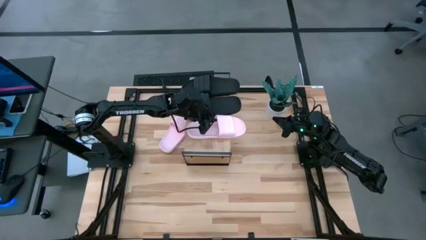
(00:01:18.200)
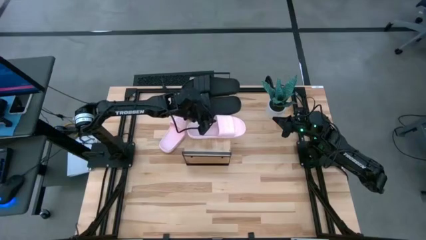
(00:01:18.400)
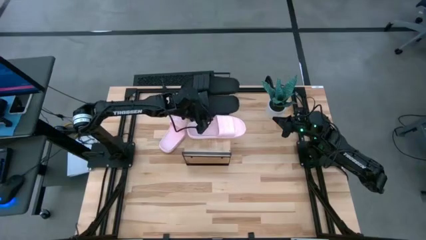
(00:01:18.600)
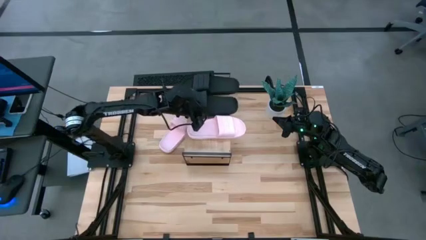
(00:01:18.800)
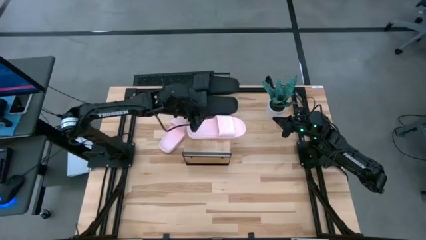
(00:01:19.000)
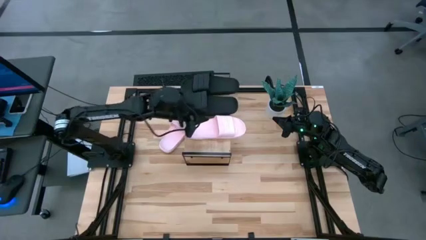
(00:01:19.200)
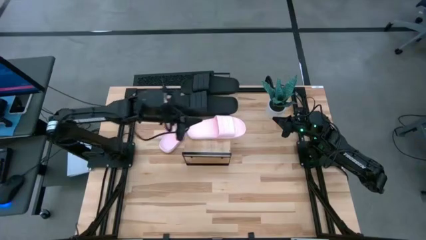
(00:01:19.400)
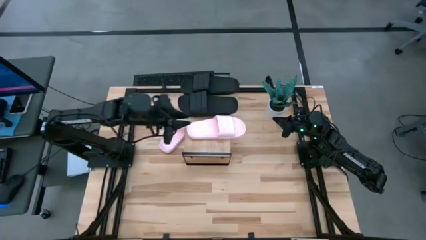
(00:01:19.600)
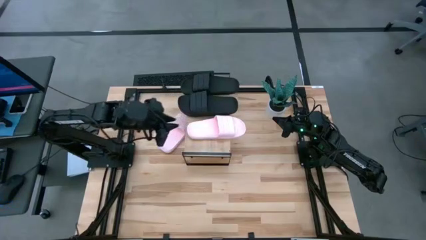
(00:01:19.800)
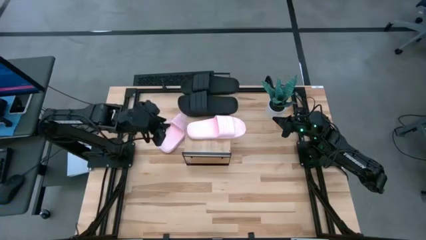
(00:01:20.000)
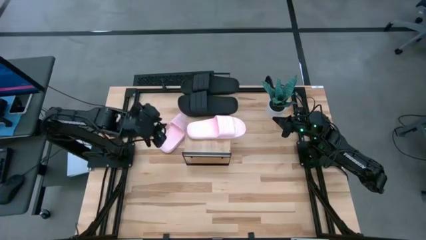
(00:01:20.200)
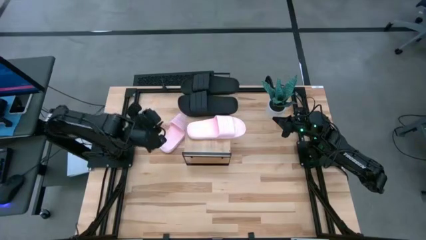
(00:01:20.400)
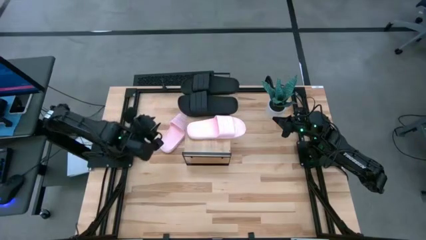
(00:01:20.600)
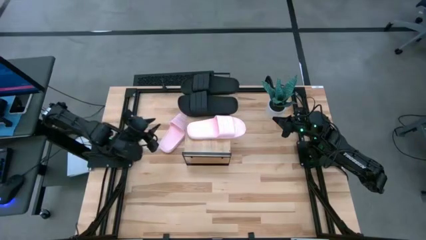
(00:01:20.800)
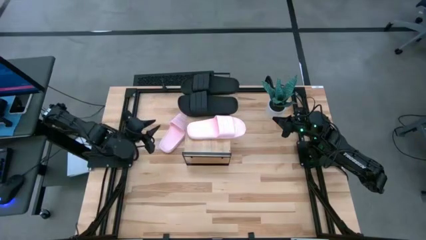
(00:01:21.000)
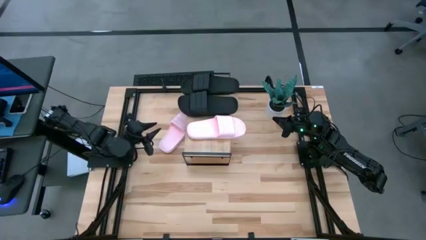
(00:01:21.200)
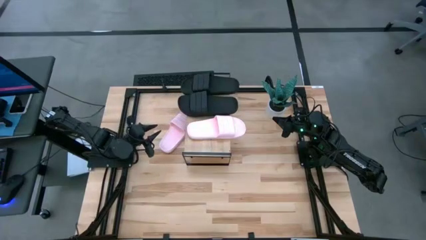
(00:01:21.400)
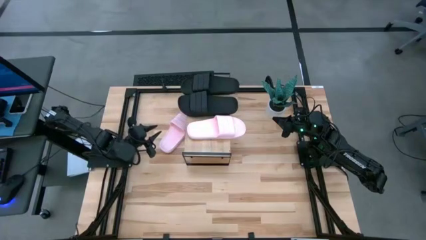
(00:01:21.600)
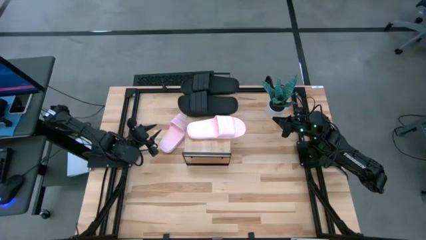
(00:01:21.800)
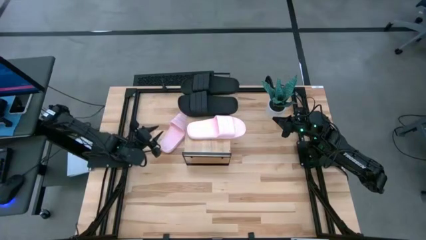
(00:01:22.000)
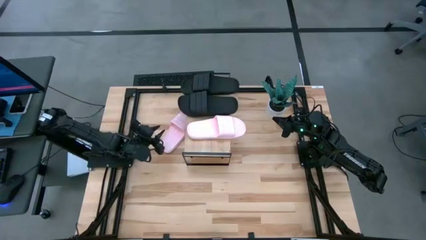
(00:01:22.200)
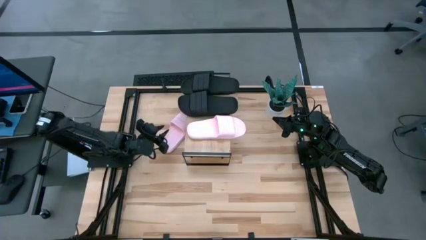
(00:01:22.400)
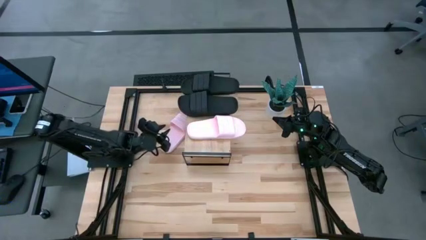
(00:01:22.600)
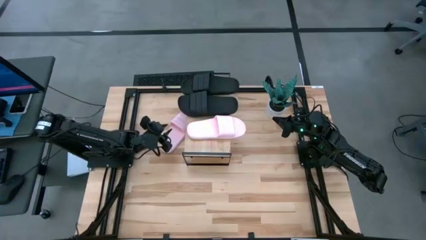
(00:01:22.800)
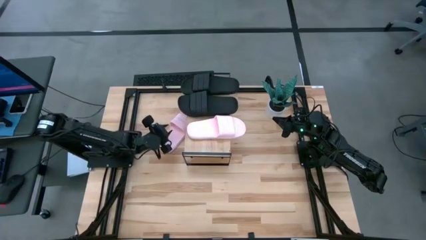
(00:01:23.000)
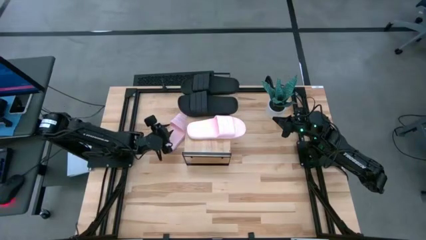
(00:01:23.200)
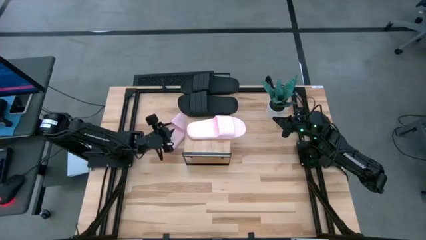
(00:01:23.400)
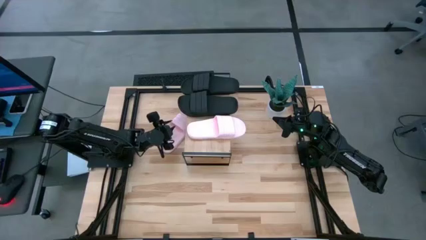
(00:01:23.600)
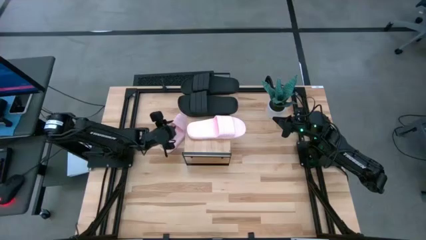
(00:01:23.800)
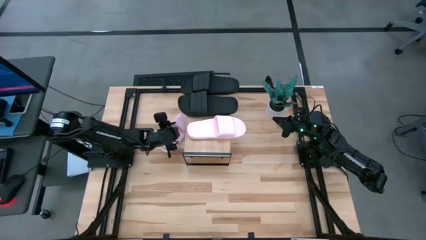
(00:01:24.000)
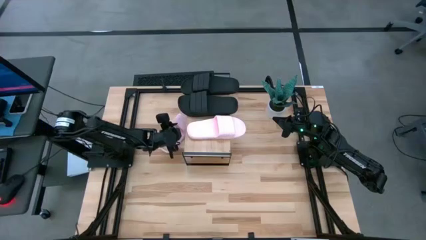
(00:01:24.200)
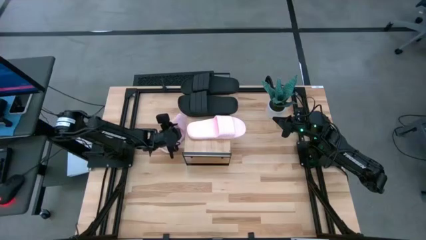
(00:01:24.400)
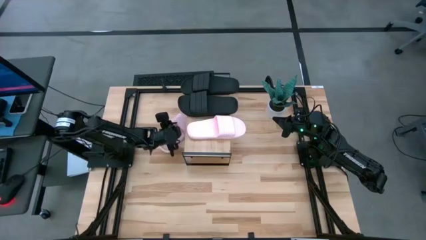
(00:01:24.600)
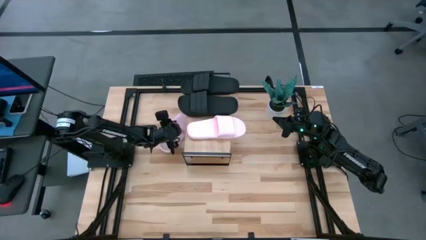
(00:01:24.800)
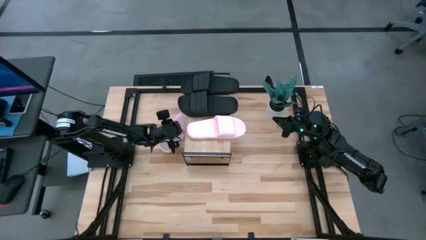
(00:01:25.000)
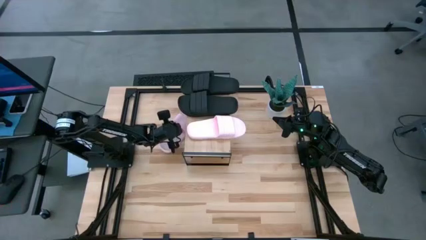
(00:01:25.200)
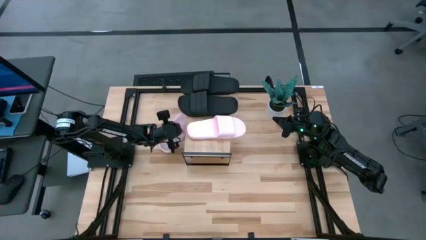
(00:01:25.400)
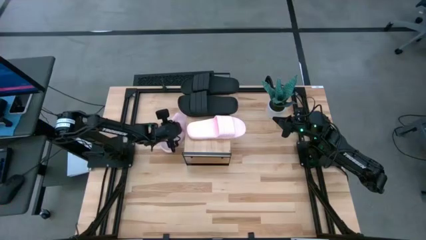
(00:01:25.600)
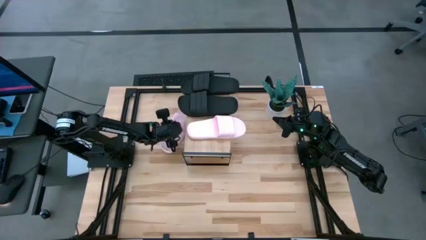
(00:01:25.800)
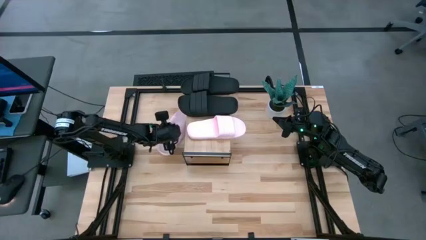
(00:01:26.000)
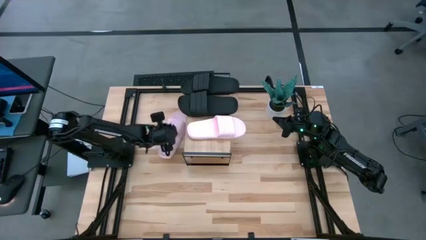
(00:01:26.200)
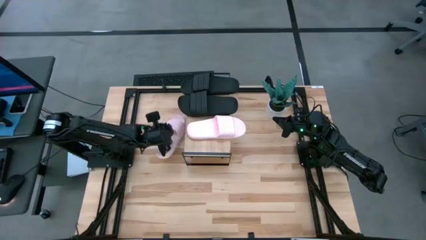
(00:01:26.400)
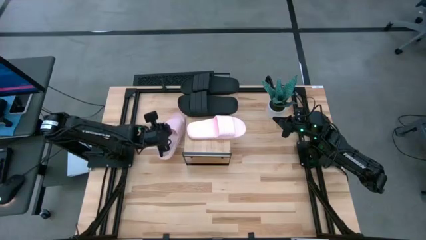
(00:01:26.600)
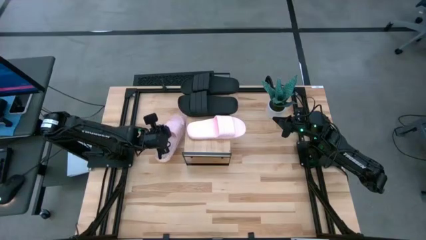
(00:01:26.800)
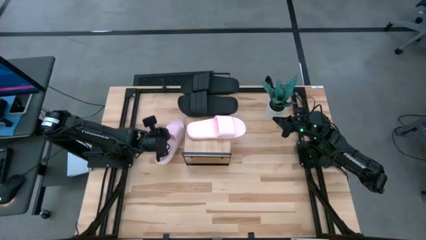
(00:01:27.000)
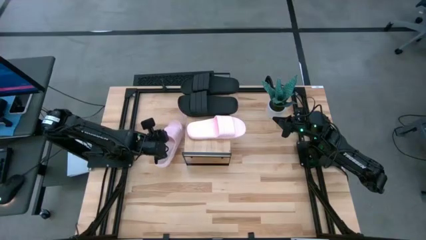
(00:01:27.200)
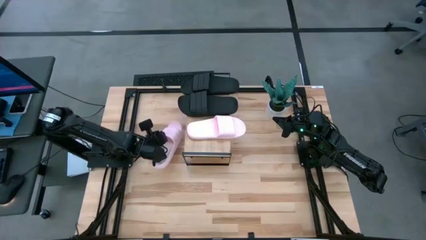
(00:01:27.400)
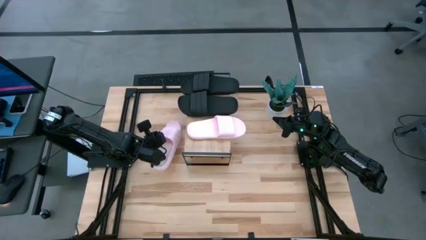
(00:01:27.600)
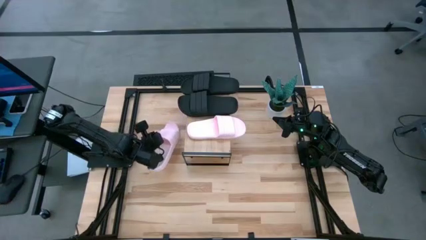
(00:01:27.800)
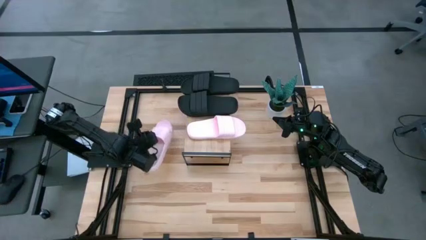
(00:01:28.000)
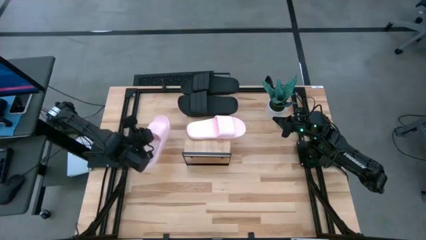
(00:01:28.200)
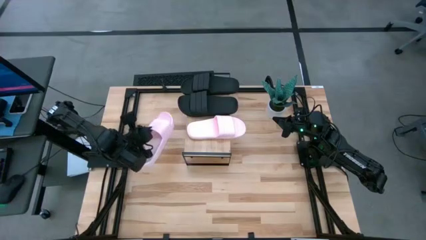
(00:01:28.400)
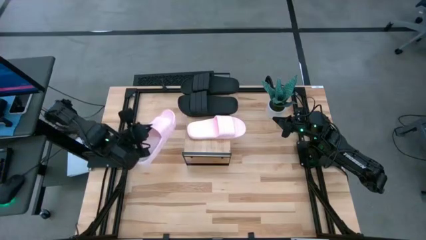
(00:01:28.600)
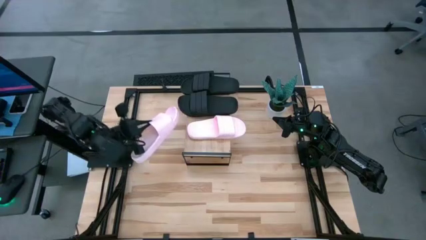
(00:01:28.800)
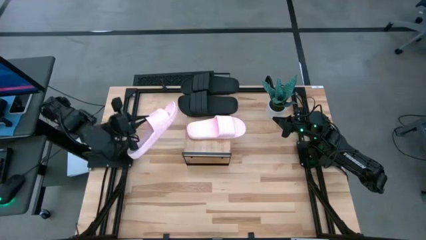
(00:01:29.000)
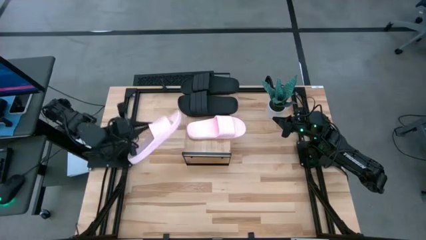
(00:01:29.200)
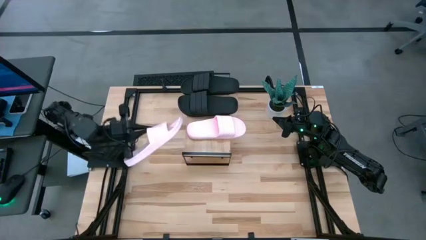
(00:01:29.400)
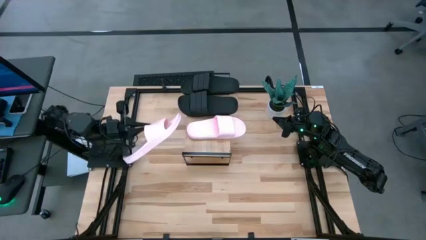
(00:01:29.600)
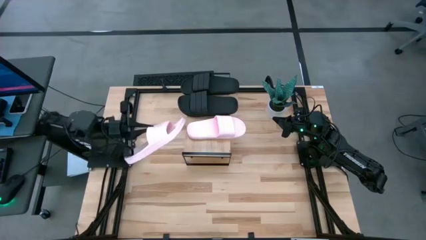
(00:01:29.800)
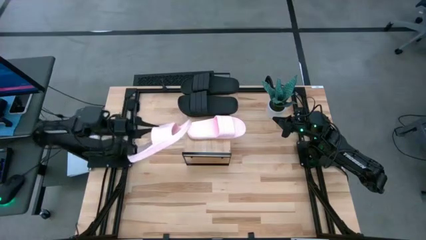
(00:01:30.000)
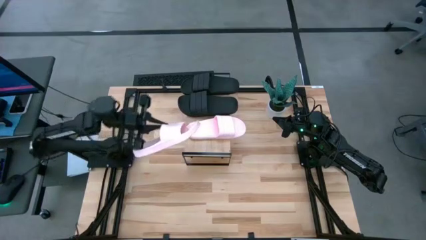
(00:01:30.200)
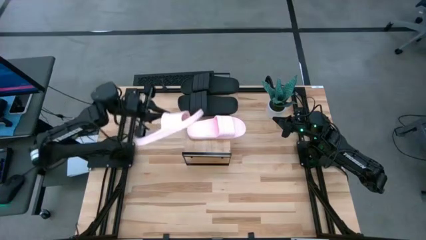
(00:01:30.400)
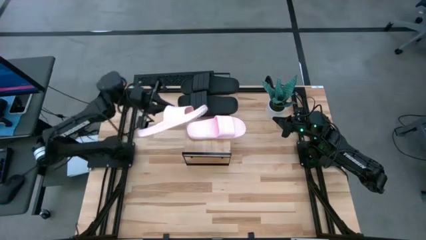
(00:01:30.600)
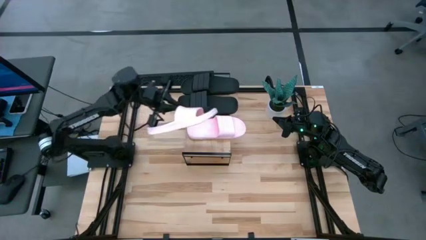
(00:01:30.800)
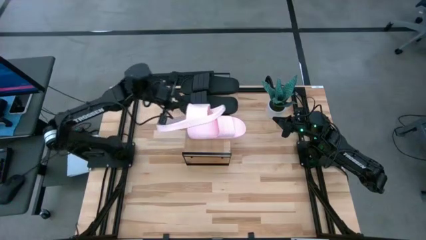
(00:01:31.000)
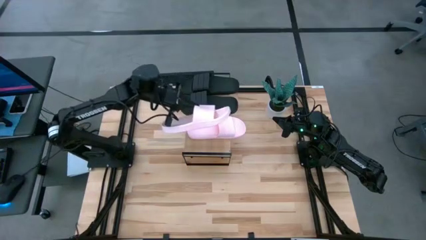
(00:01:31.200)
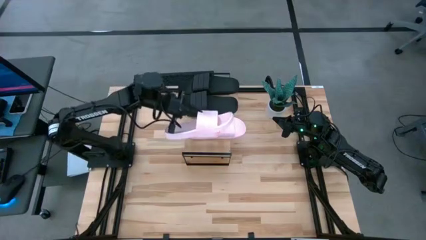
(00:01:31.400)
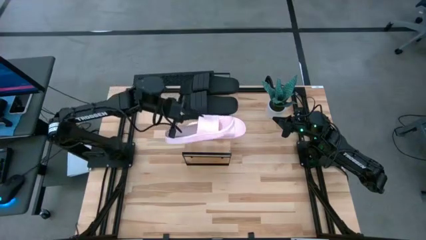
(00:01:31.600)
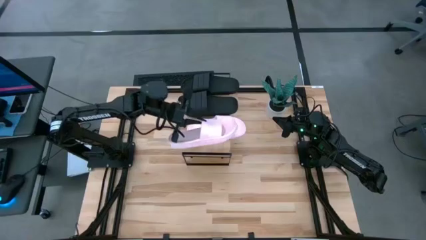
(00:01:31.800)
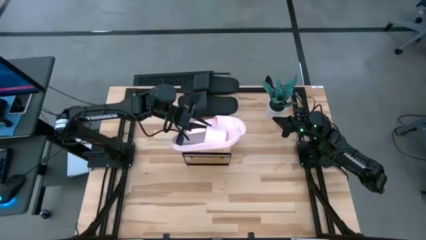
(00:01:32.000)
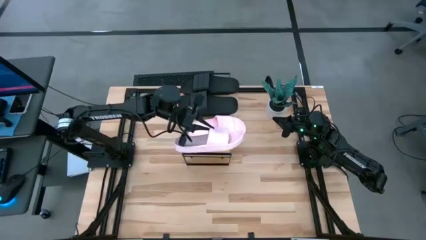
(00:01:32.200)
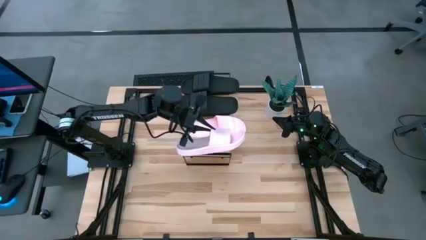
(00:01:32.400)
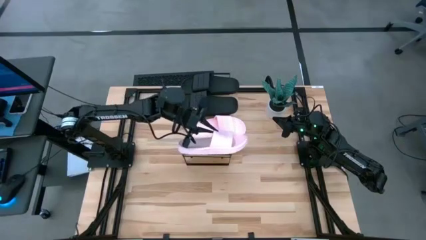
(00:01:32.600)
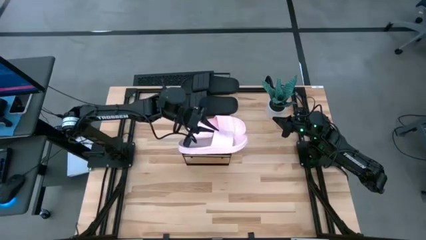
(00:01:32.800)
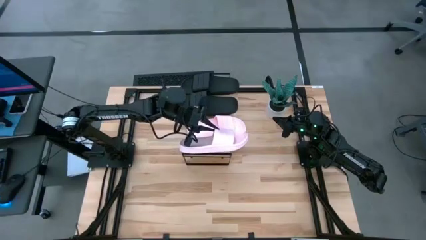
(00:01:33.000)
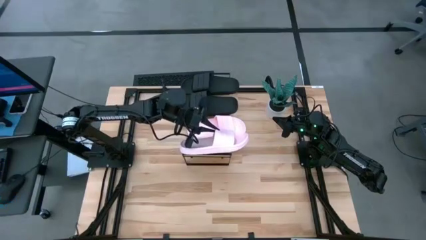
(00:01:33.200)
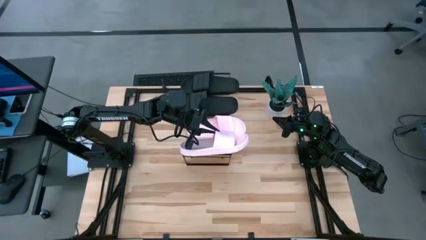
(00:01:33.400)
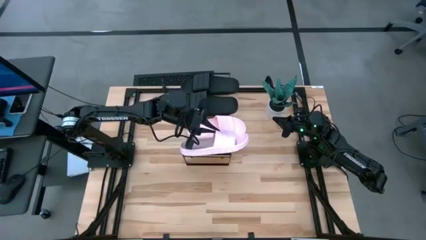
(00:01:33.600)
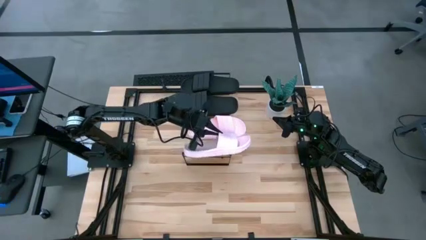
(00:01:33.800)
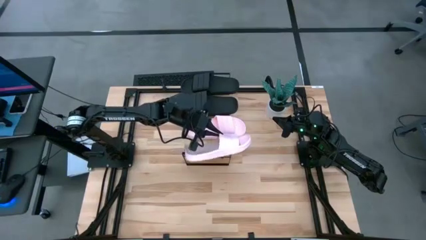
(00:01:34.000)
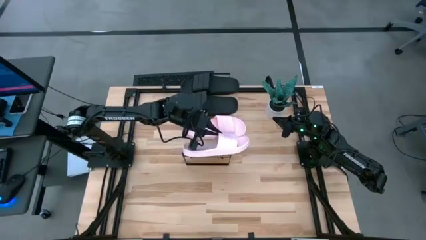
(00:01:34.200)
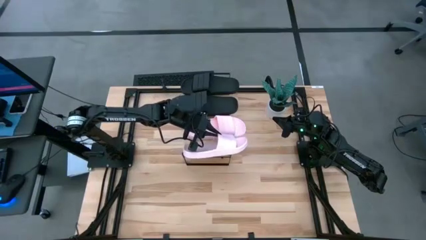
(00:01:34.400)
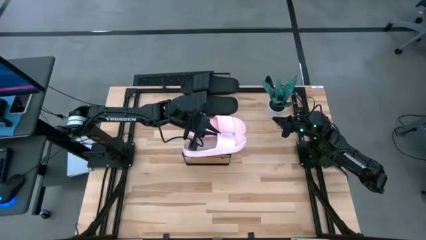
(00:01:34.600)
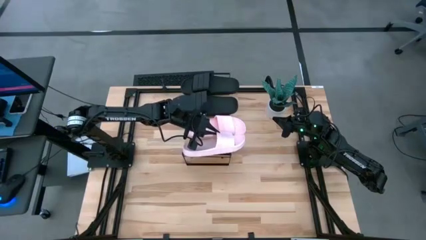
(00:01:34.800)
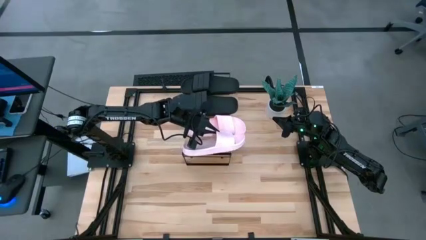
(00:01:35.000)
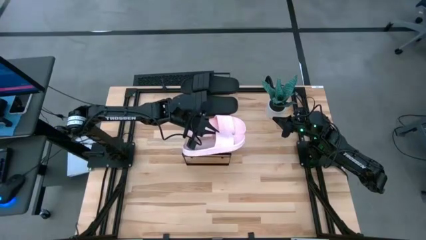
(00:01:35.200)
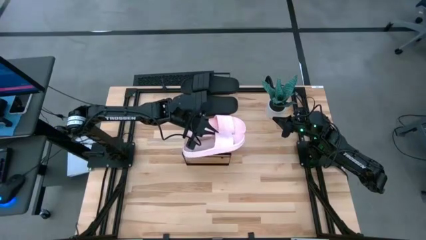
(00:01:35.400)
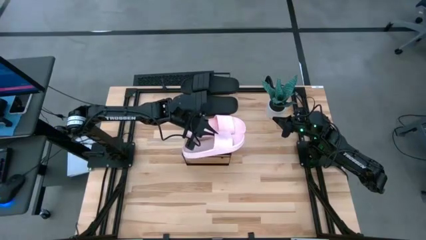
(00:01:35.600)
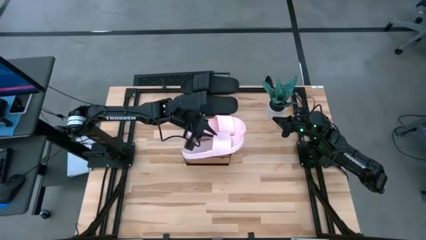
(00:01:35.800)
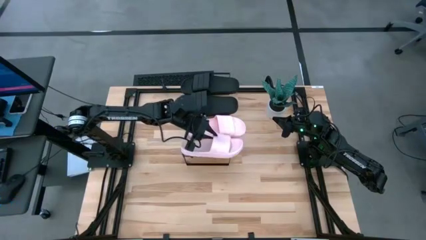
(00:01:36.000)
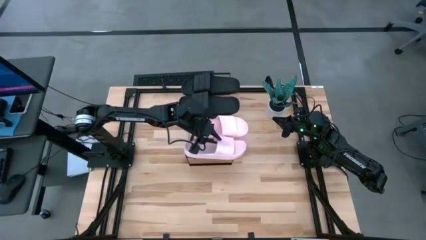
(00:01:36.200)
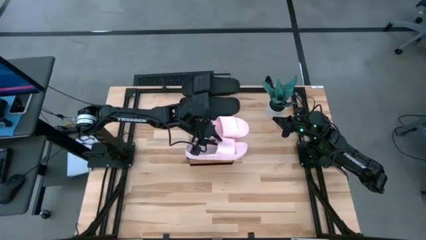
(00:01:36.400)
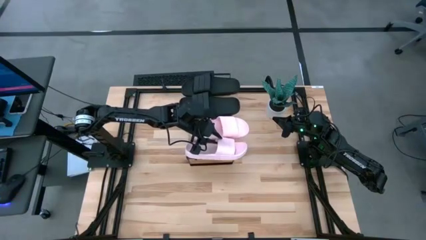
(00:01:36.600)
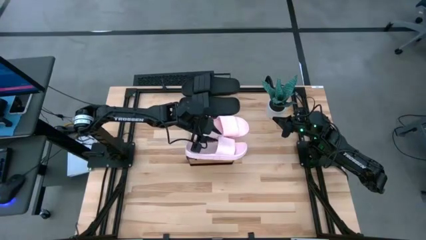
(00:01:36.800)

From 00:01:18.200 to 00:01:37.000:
Task: Pick and place slides into the shelf
Put the pink slide on the shelf
